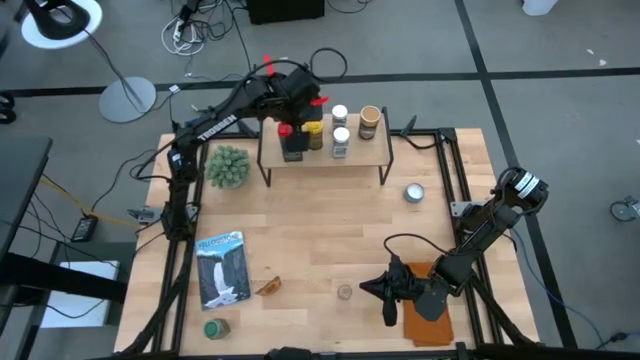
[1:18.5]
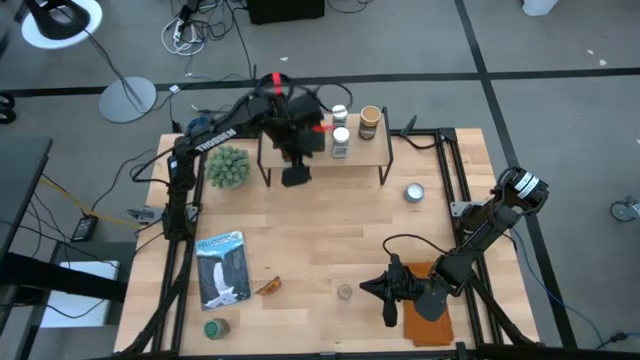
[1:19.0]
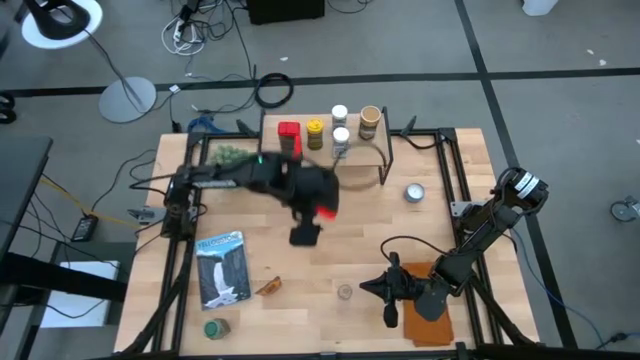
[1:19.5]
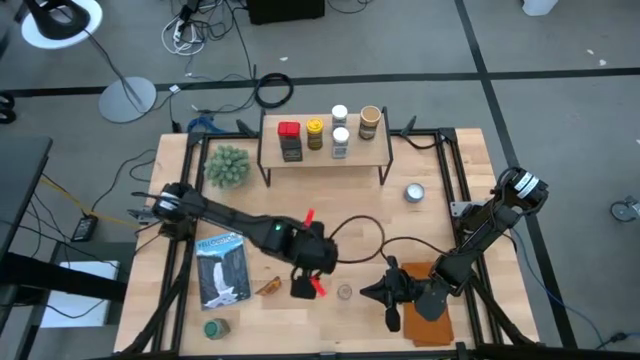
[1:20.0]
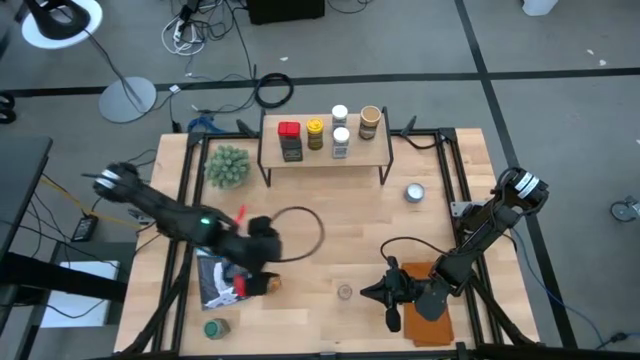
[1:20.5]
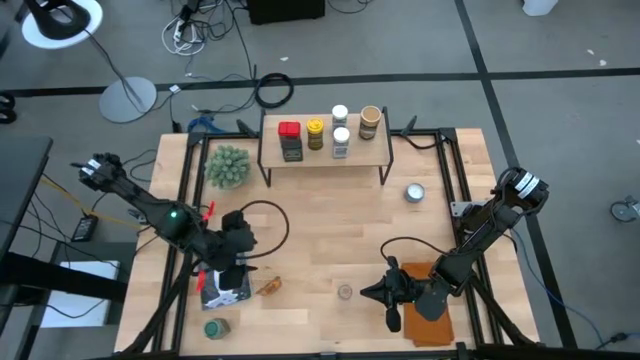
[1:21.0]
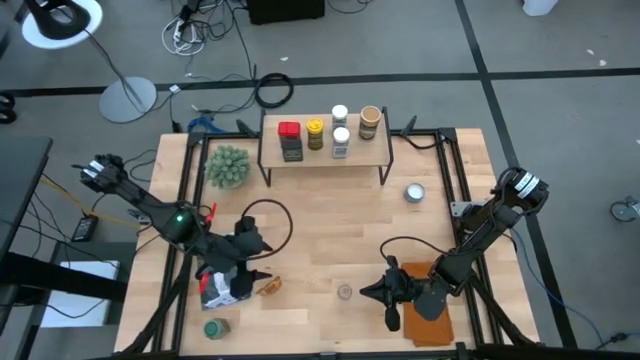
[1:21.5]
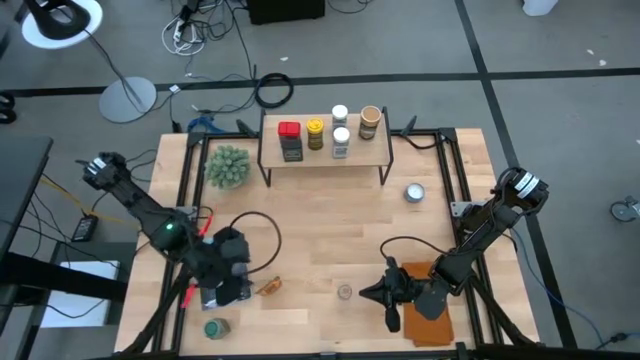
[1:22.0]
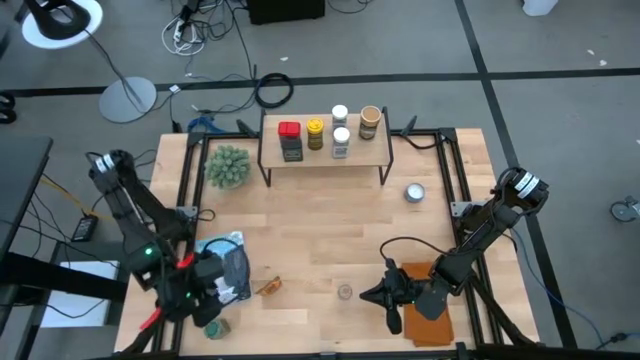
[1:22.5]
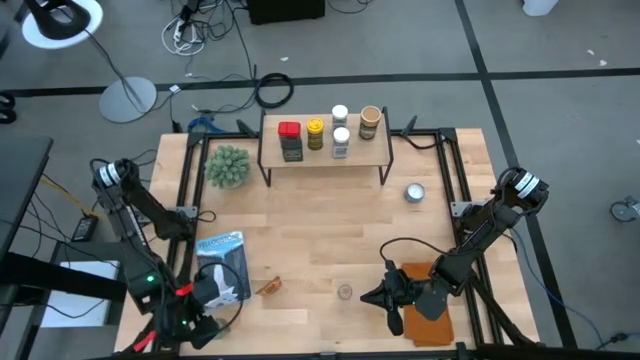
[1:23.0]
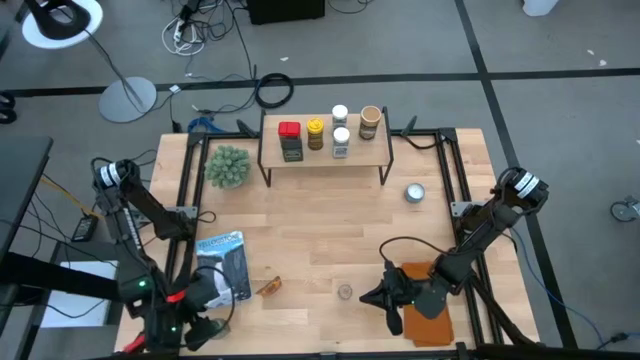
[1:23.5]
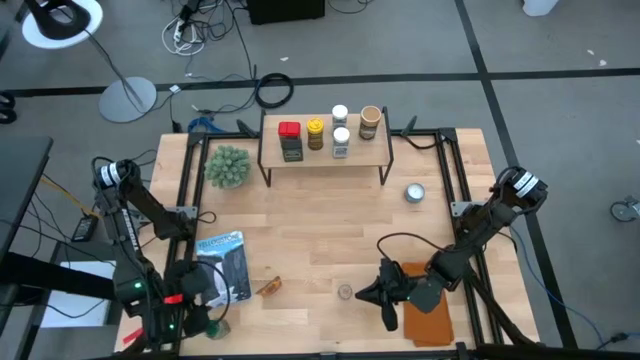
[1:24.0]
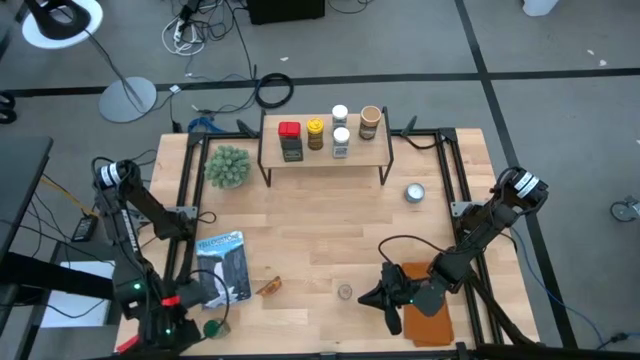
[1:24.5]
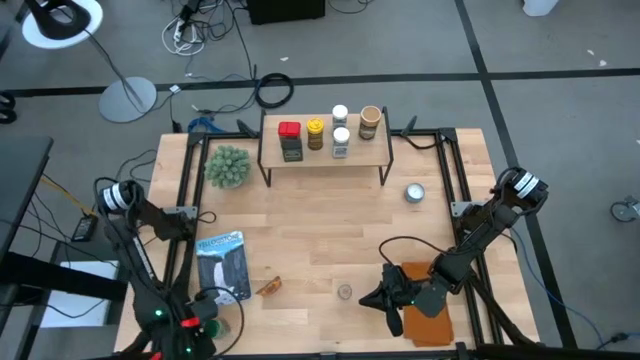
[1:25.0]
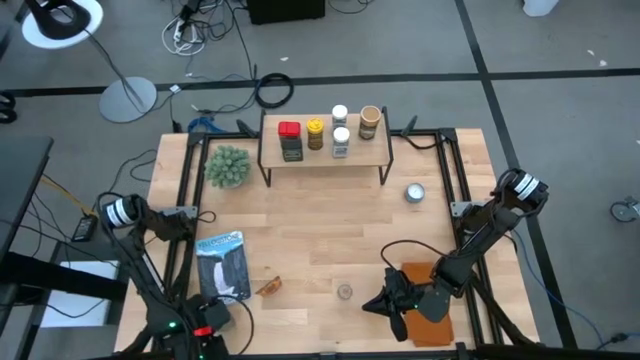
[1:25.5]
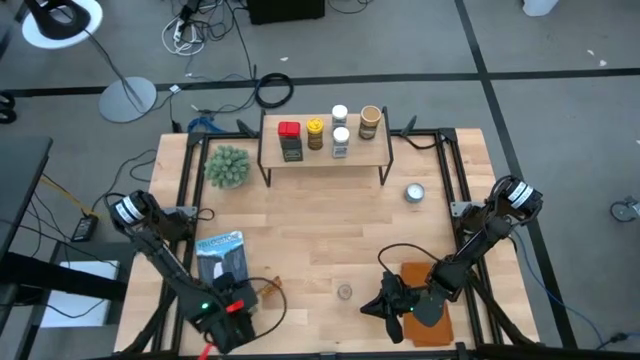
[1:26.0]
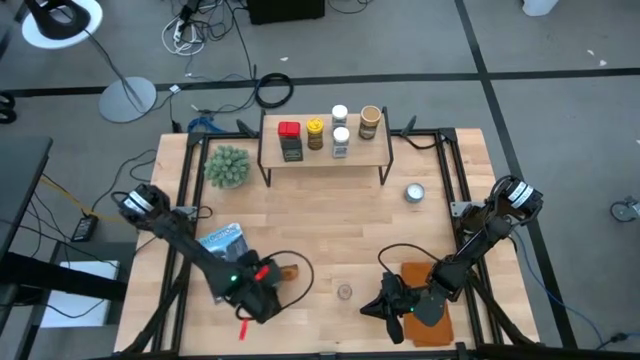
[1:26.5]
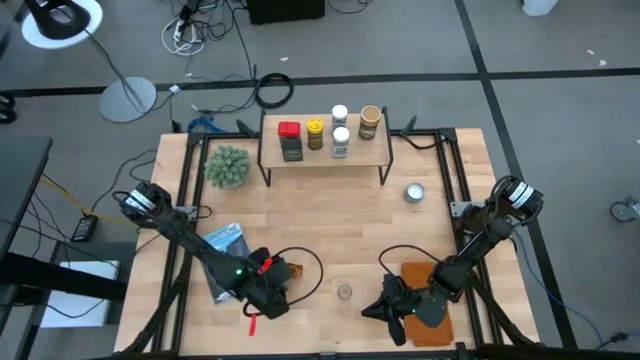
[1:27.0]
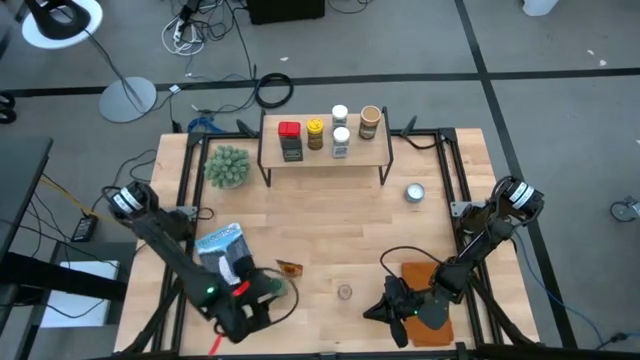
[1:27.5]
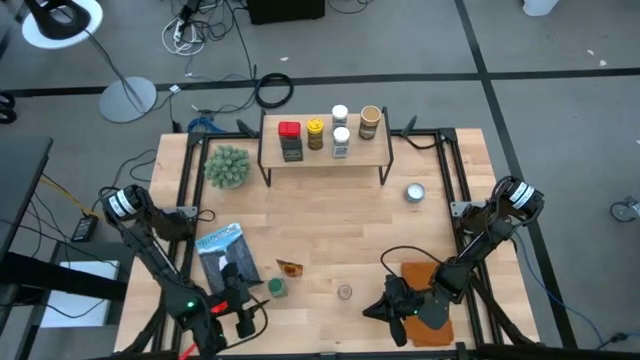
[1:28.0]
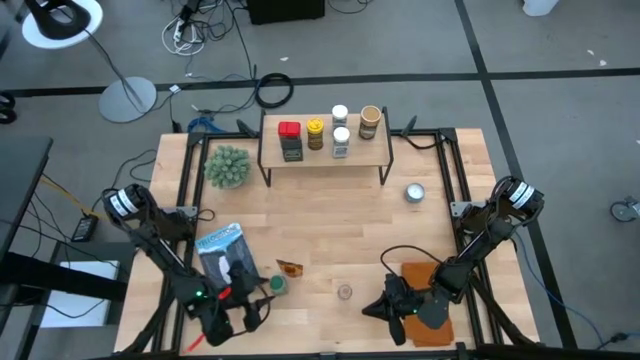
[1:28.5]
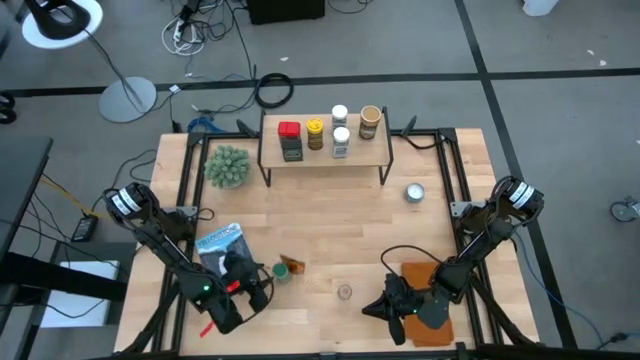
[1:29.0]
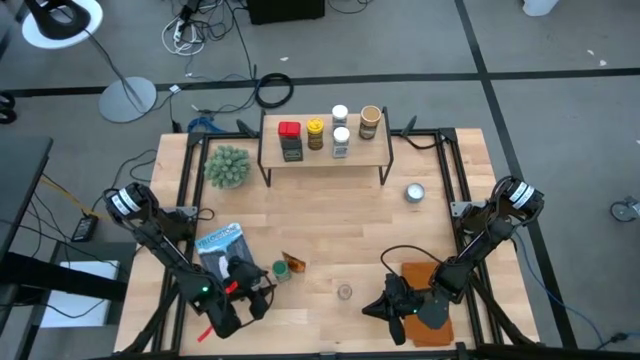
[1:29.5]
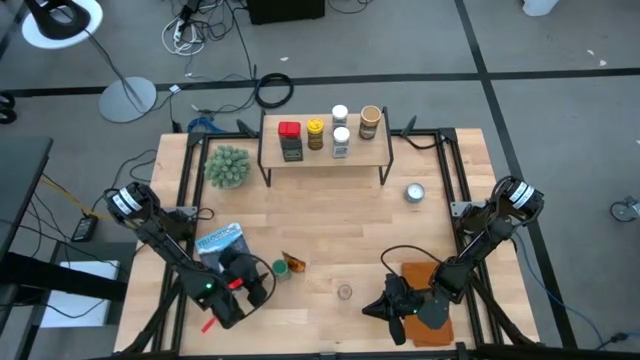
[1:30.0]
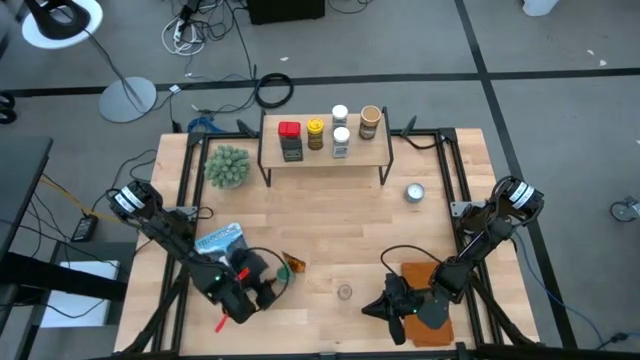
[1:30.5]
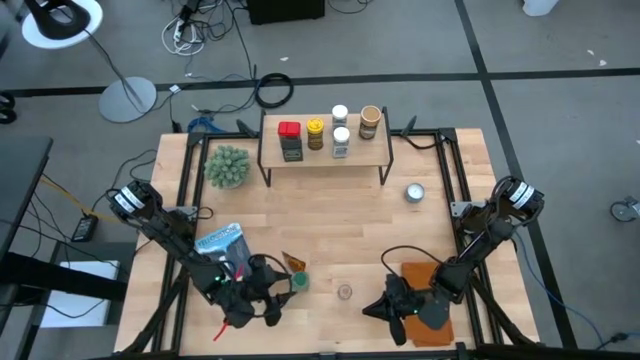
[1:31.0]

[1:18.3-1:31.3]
Task: Shelf spices
Put the green seasoning bottle on the shelf

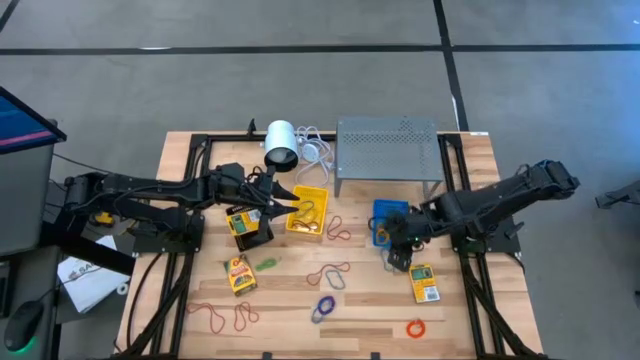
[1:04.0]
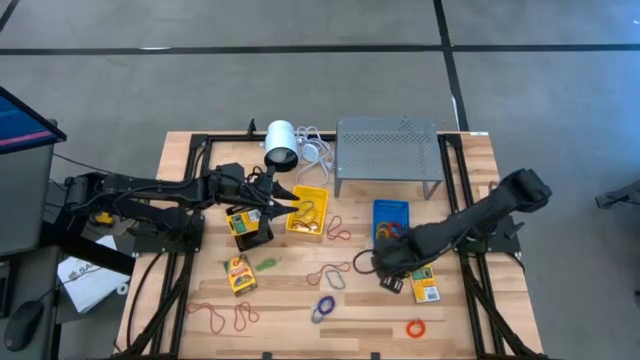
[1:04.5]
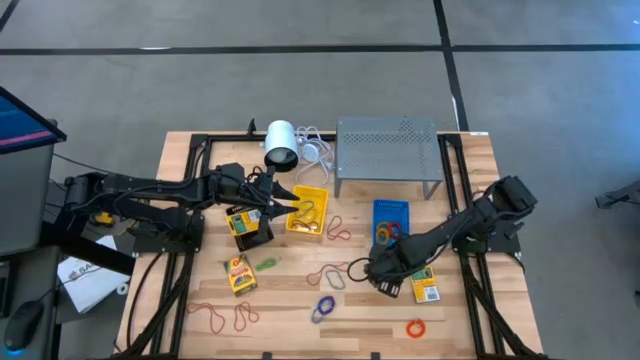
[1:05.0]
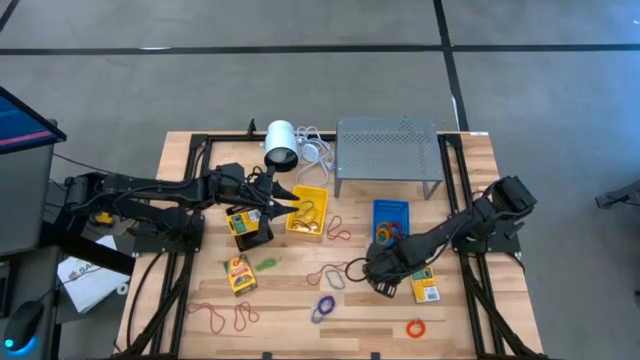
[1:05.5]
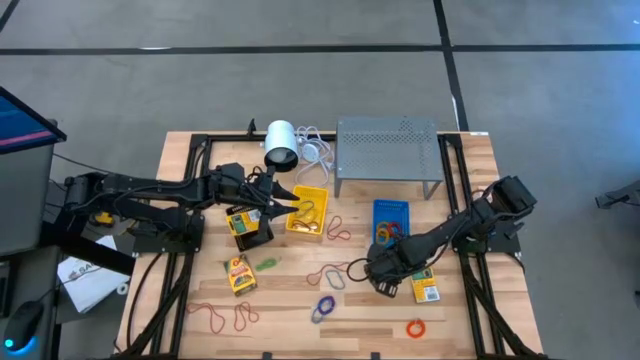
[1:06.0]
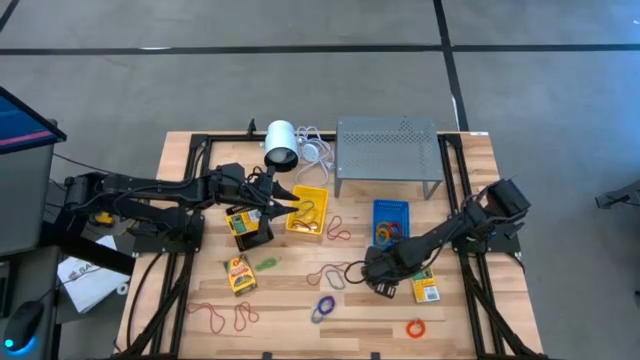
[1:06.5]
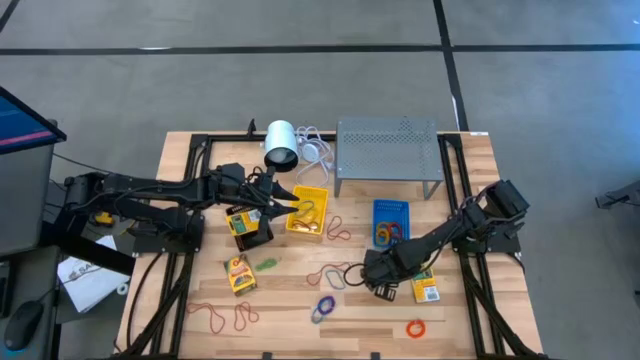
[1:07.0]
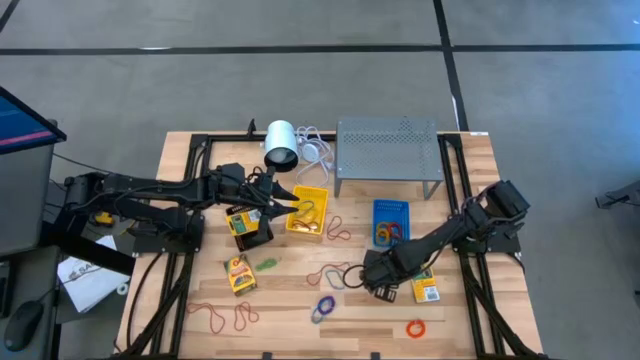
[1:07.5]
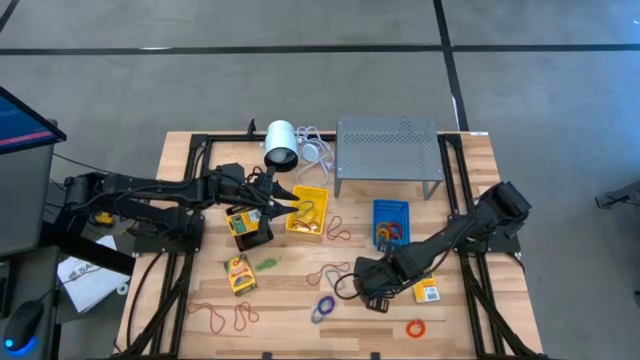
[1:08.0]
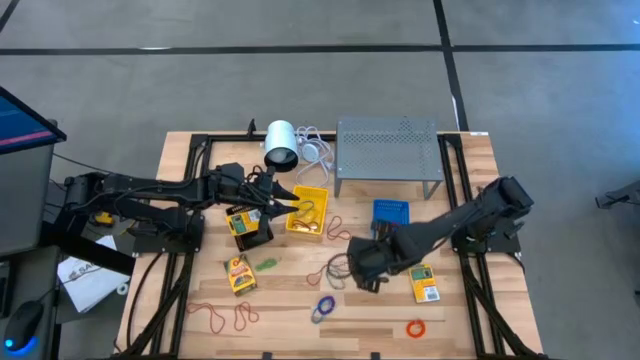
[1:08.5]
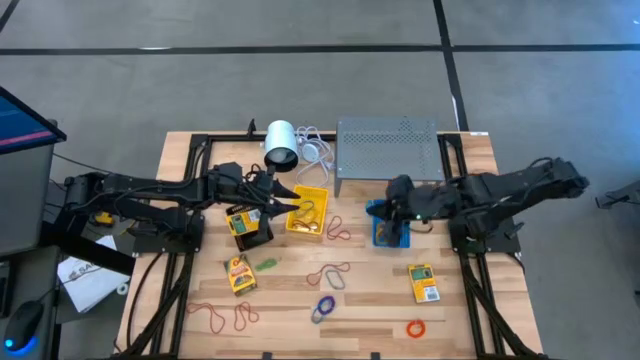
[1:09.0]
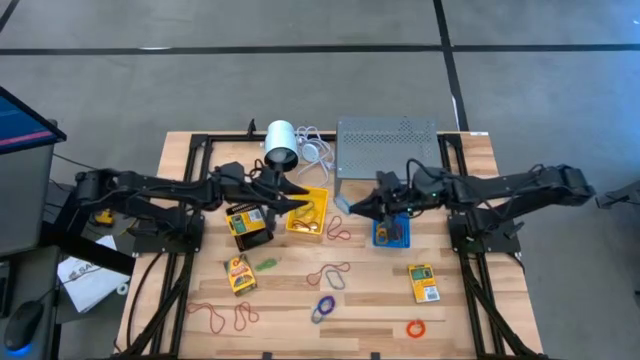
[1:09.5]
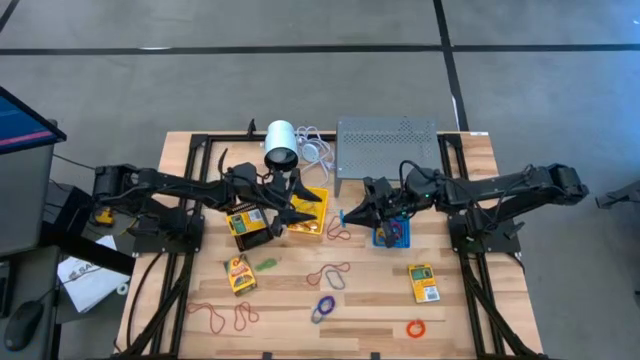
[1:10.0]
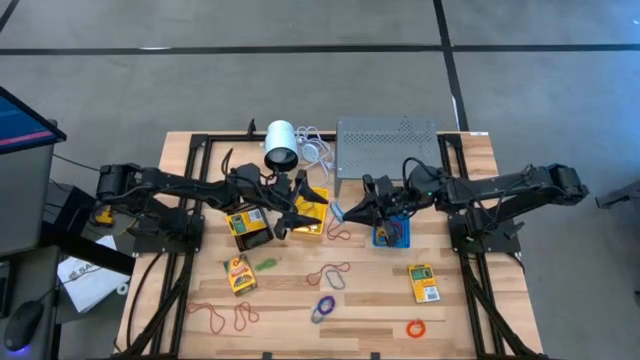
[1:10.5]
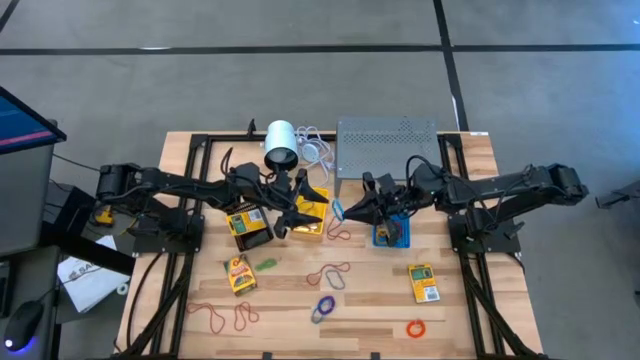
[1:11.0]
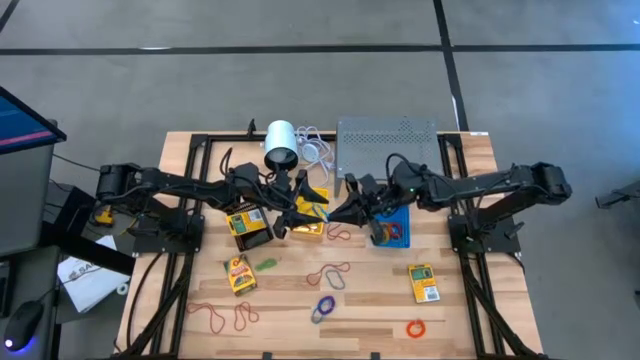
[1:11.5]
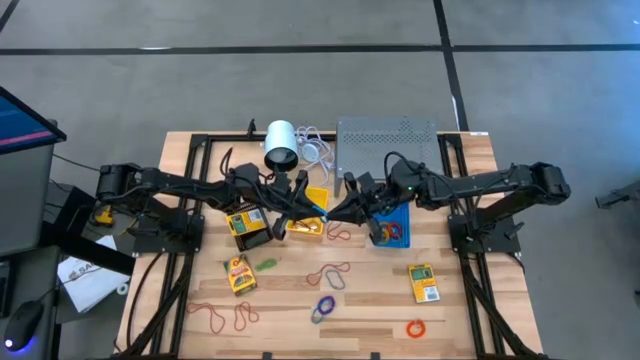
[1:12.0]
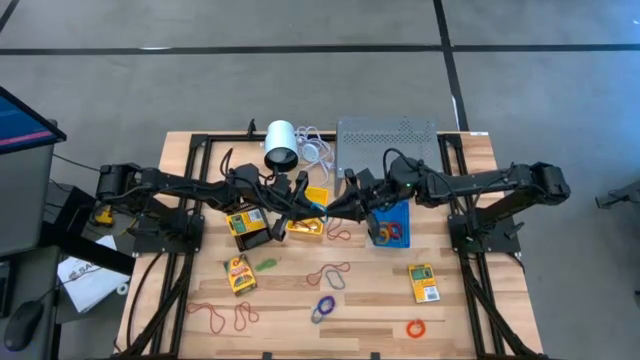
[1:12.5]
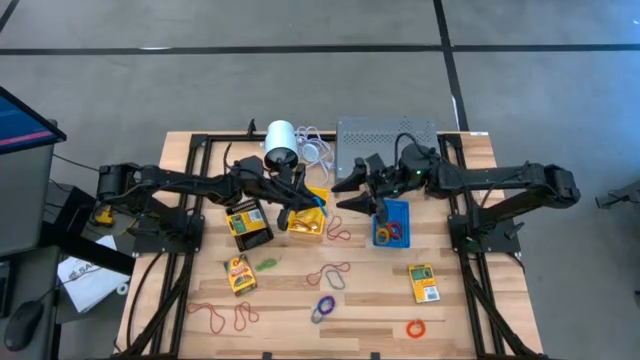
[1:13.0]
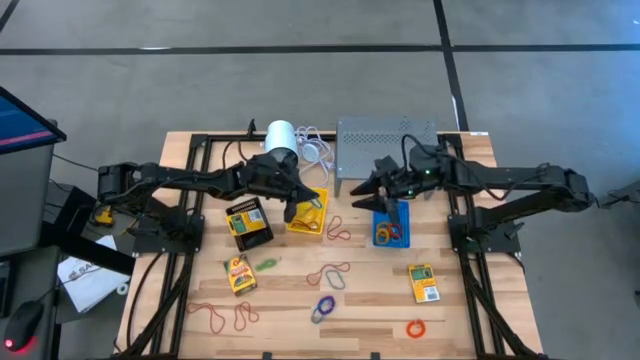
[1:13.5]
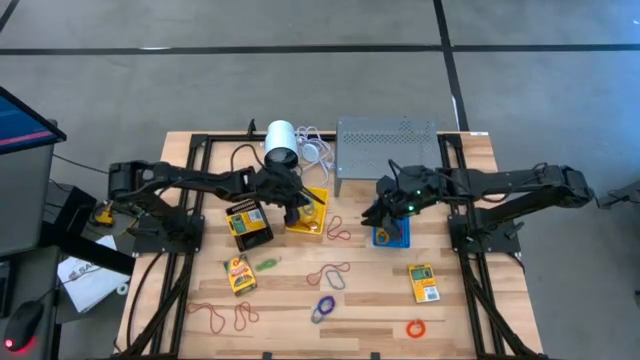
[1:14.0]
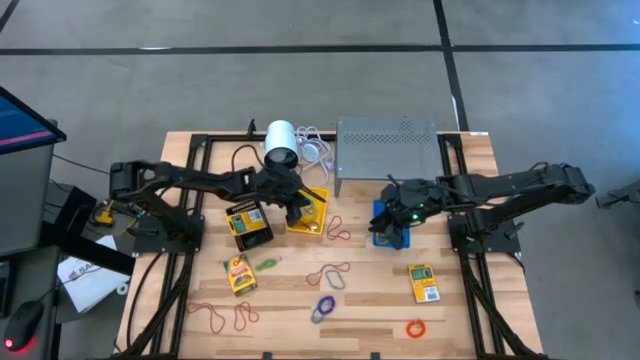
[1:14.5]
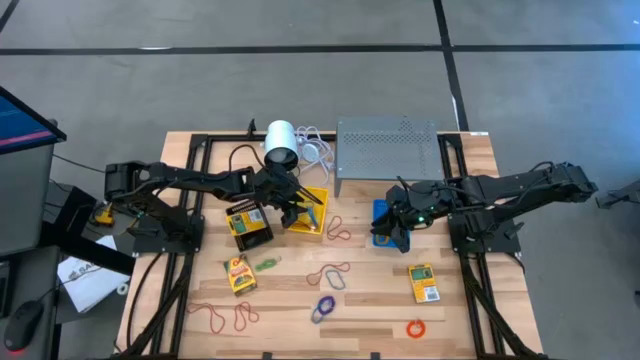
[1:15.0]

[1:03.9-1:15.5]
Task: Pick & Place Office Desk Supplies
Put the top right blue rubber band into the yellow basket
